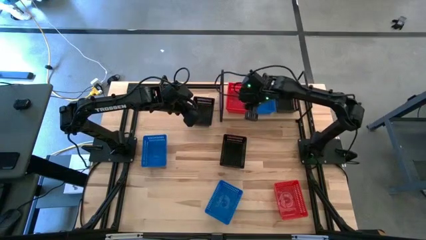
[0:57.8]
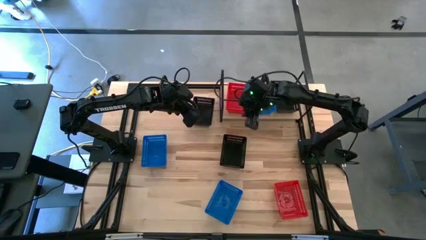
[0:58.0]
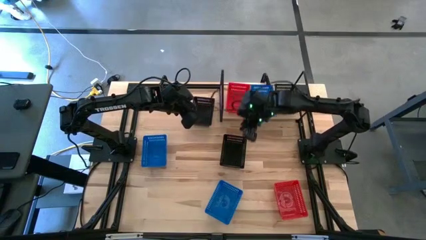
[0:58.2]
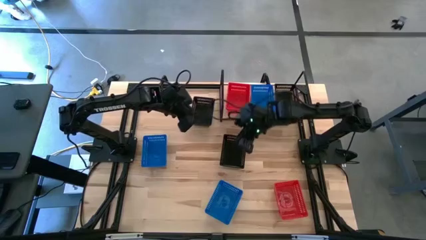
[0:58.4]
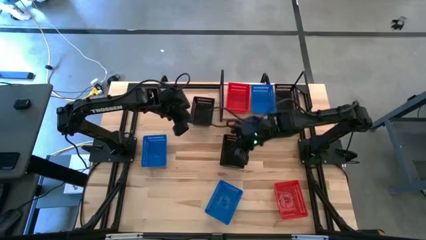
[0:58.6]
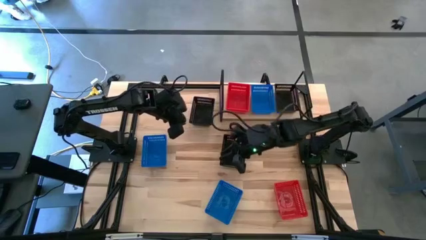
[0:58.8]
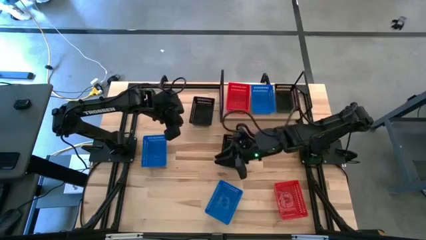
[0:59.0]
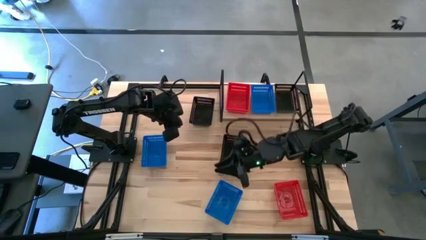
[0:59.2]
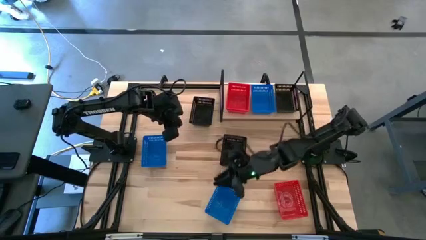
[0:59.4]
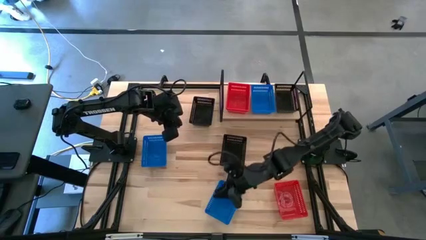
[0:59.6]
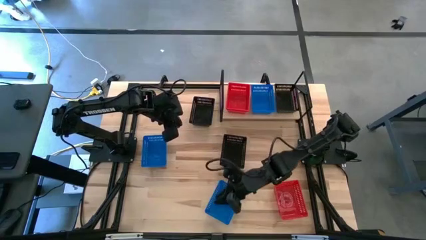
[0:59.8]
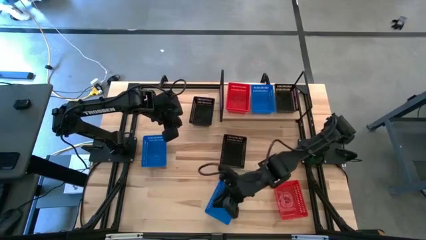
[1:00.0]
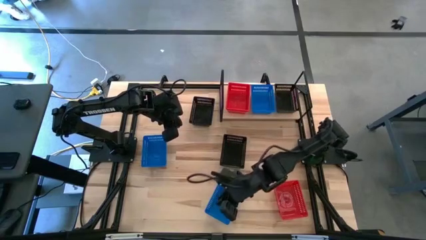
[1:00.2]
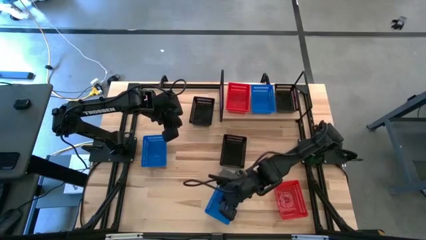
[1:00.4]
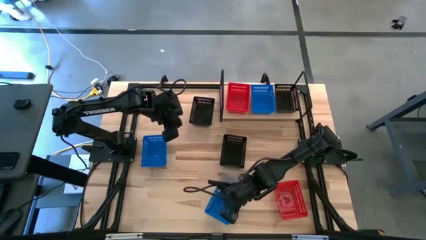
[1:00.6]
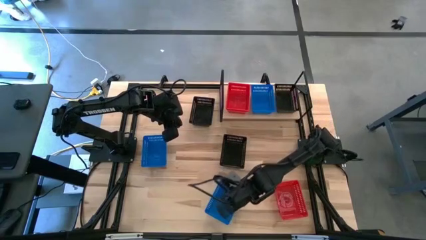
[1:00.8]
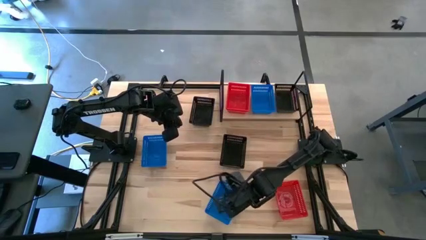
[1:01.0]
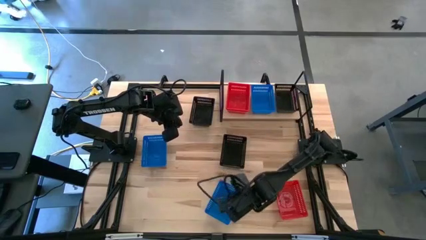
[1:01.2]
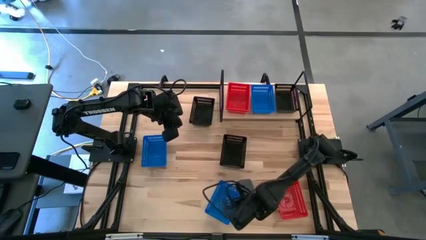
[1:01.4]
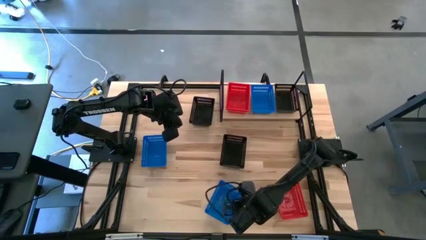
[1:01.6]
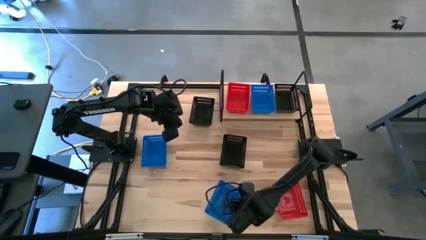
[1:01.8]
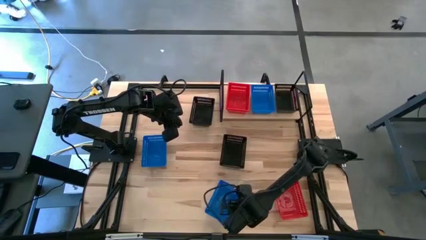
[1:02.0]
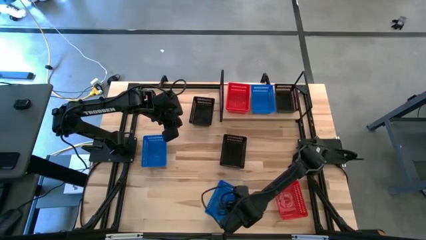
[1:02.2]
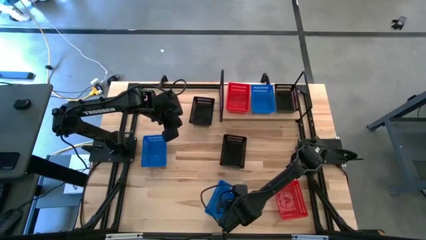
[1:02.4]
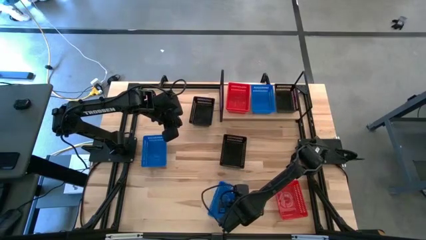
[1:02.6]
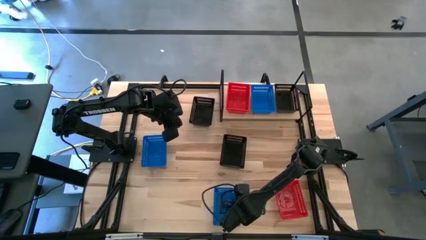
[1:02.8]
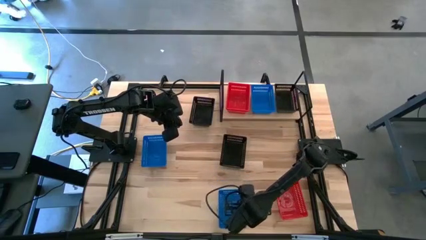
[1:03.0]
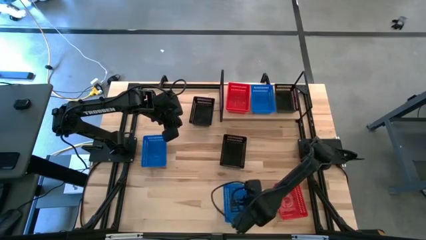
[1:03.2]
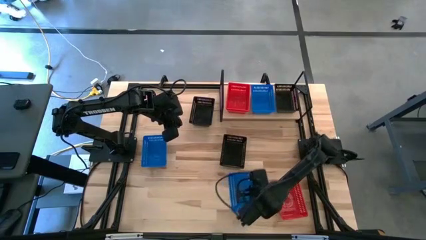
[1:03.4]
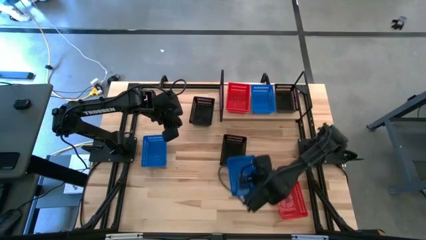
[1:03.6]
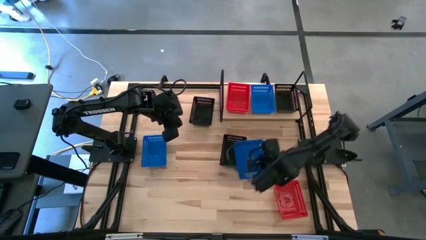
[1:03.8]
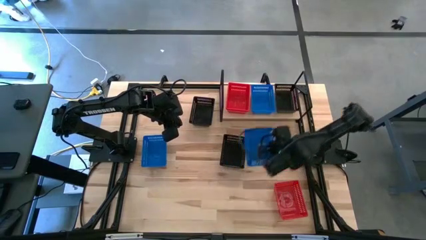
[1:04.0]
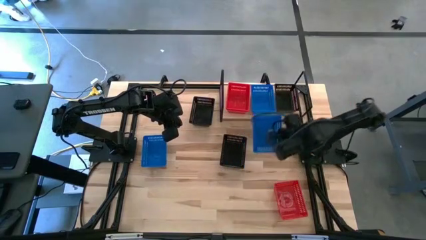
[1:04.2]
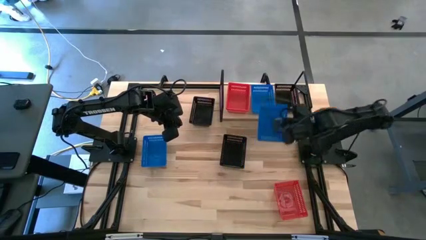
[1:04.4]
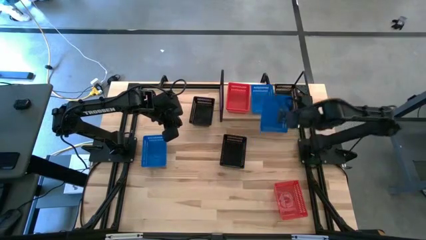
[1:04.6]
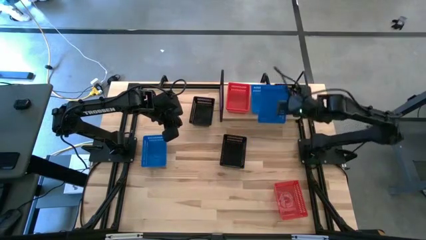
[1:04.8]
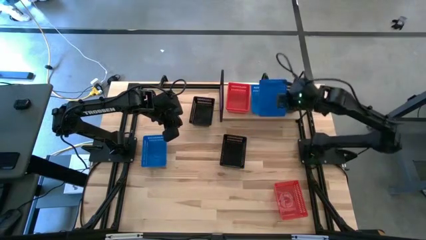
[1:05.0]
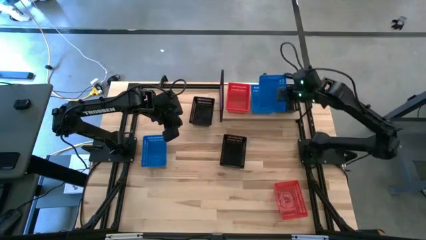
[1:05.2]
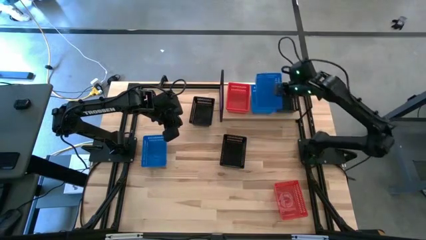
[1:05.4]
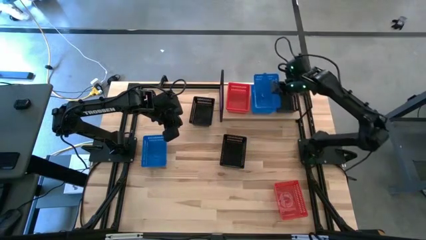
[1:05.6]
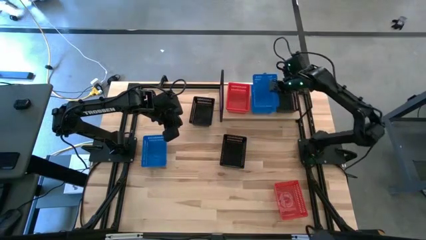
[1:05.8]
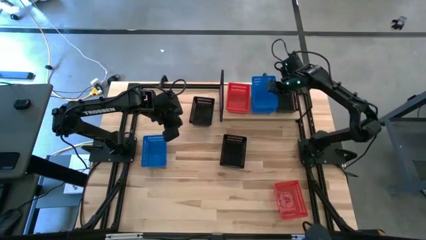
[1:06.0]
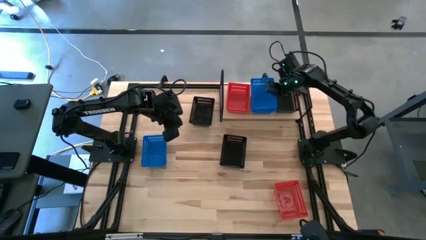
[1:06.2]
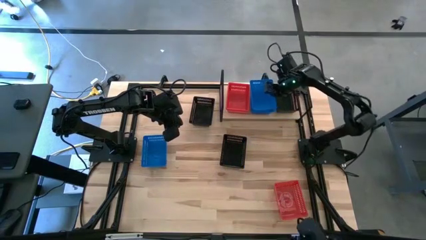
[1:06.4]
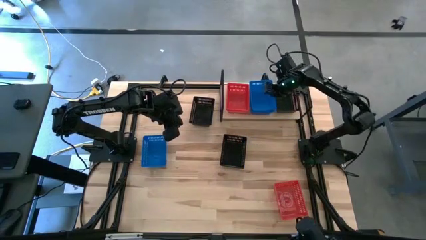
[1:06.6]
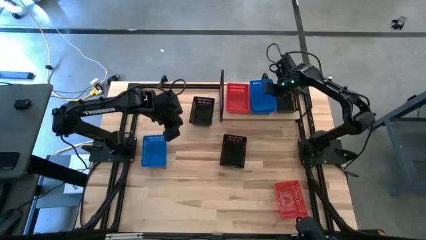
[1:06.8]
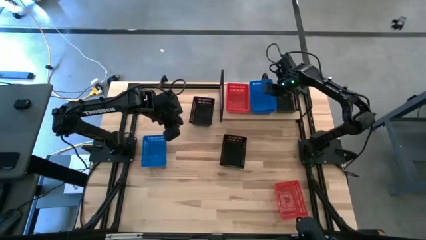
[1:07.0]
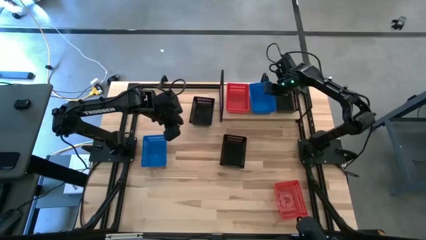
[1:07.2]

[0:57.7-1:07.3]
Task: Stack baskets on shelf by color
Stack the bottom blue bin on the other blue bin on the shelf

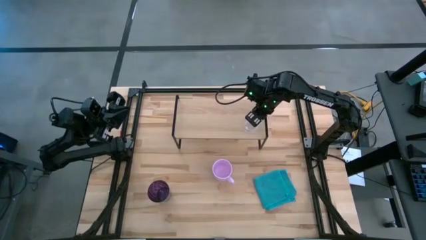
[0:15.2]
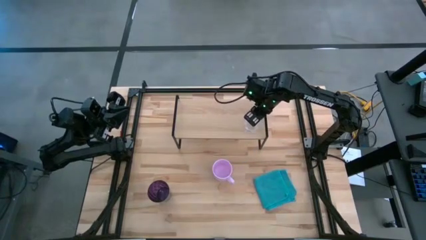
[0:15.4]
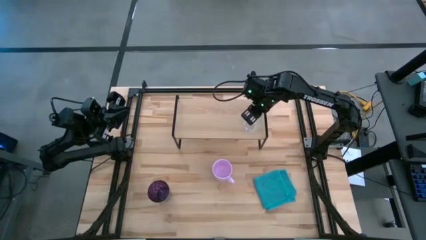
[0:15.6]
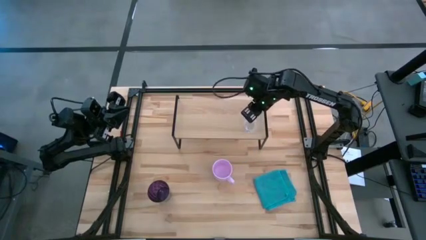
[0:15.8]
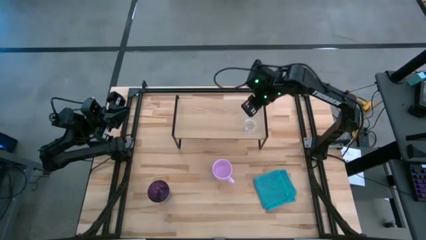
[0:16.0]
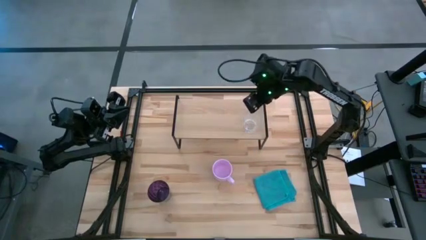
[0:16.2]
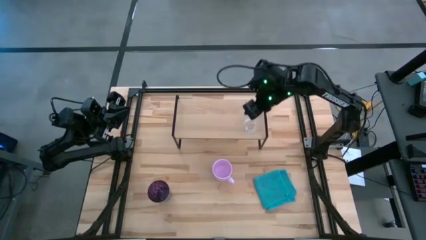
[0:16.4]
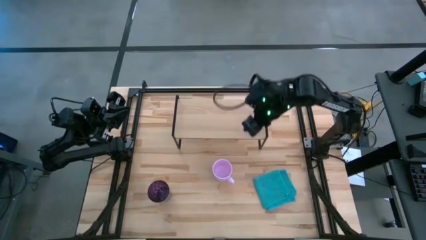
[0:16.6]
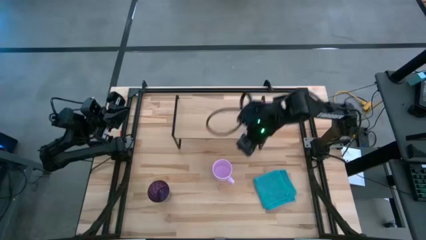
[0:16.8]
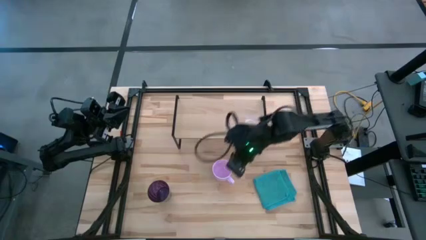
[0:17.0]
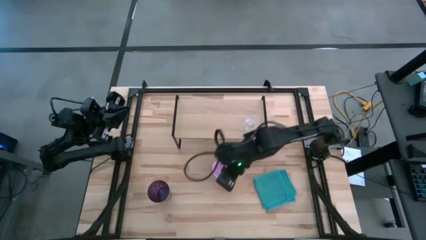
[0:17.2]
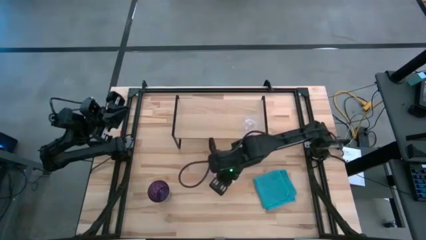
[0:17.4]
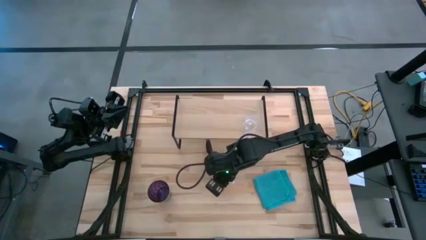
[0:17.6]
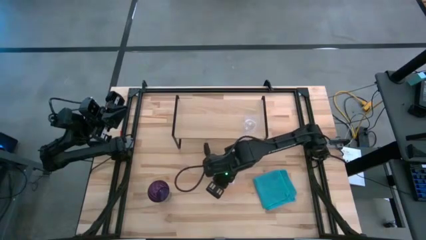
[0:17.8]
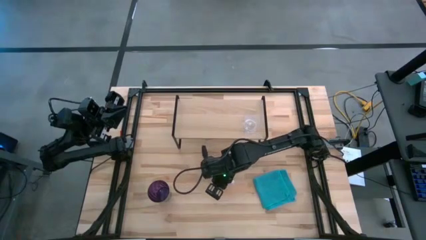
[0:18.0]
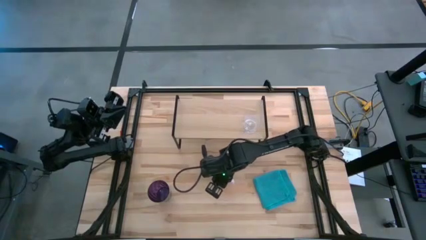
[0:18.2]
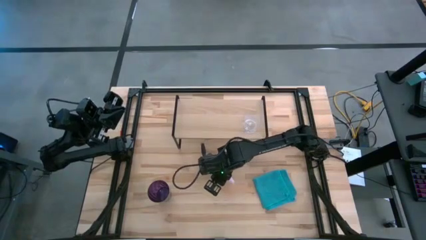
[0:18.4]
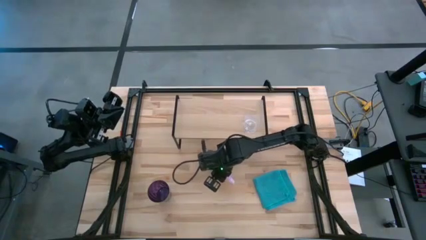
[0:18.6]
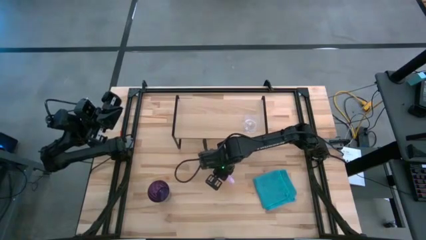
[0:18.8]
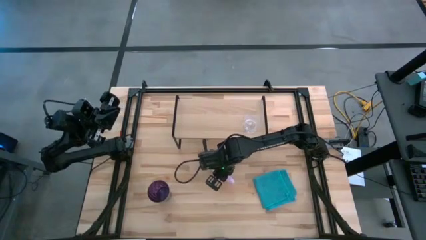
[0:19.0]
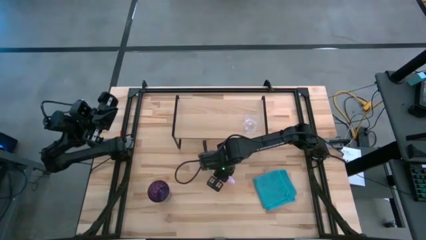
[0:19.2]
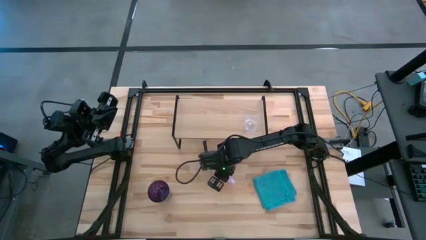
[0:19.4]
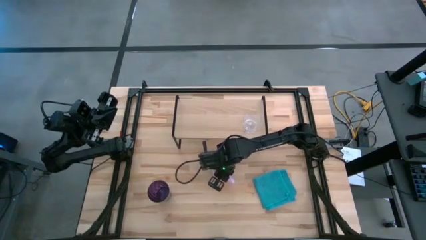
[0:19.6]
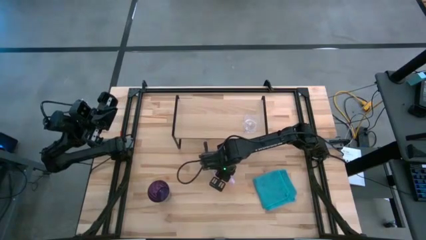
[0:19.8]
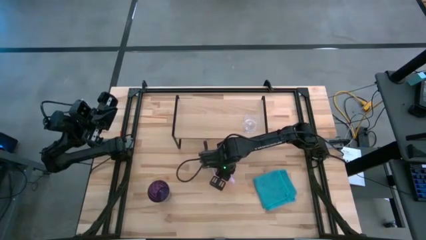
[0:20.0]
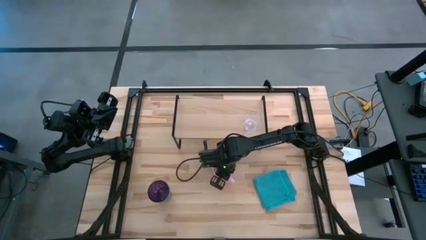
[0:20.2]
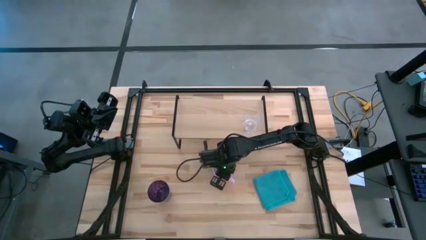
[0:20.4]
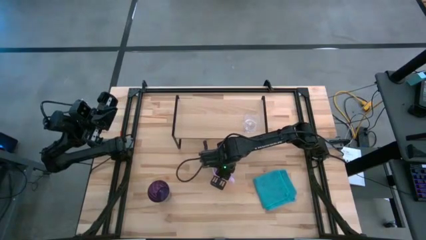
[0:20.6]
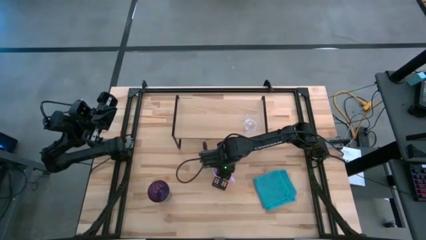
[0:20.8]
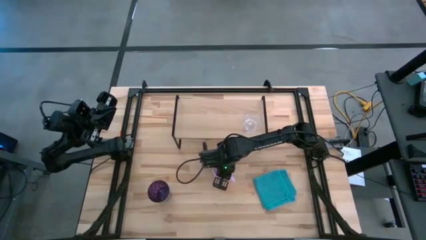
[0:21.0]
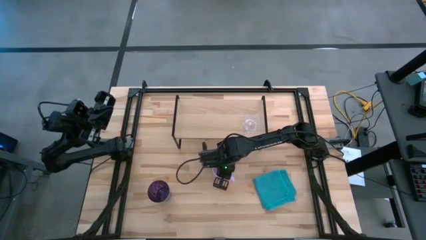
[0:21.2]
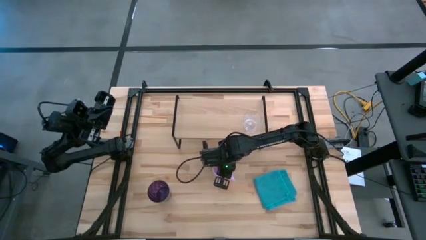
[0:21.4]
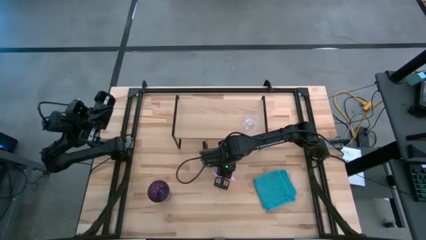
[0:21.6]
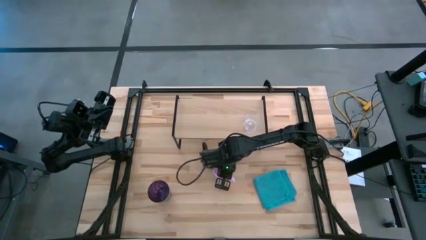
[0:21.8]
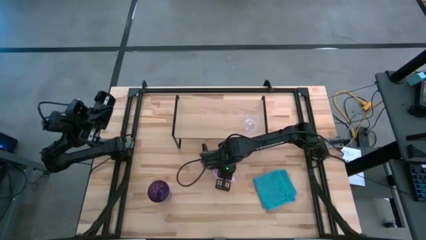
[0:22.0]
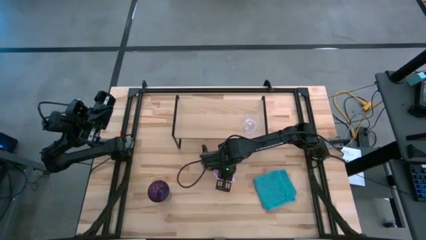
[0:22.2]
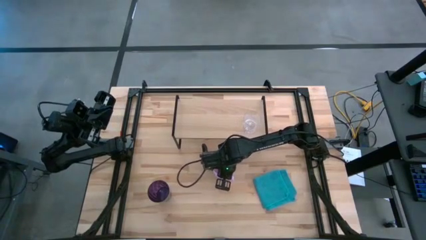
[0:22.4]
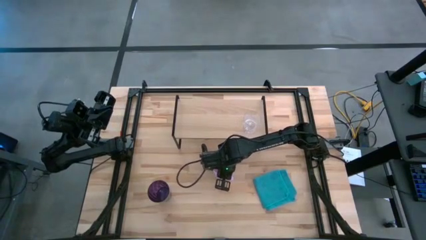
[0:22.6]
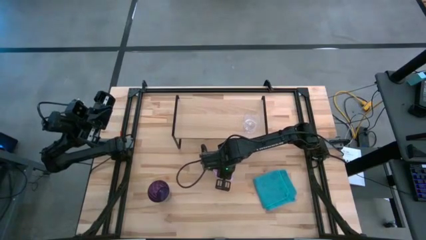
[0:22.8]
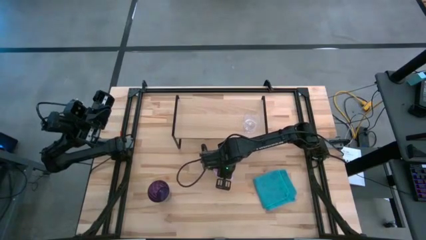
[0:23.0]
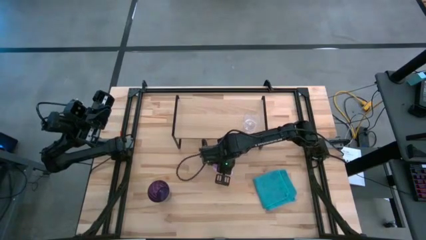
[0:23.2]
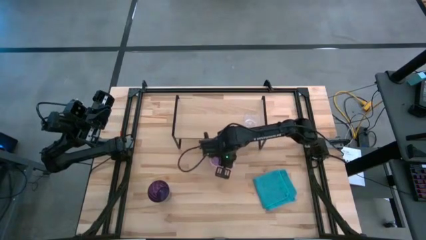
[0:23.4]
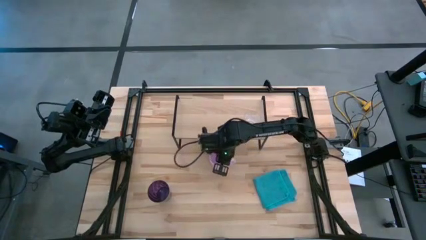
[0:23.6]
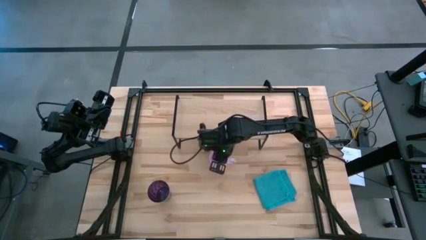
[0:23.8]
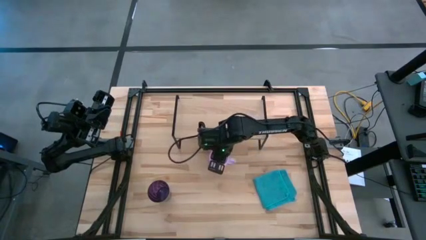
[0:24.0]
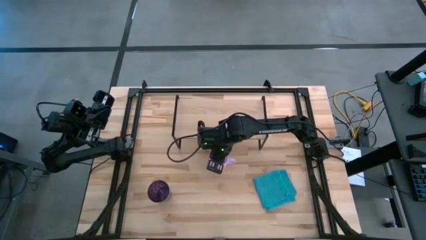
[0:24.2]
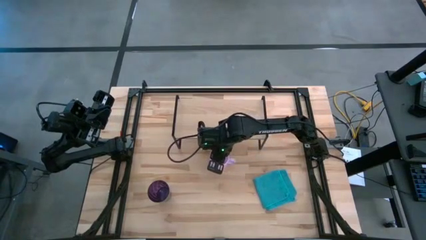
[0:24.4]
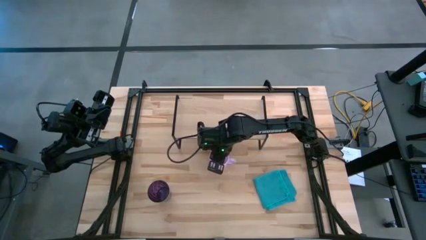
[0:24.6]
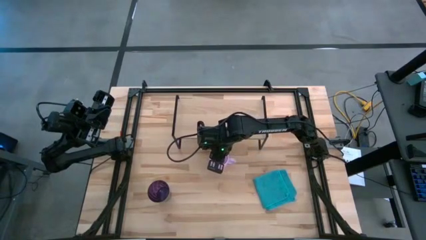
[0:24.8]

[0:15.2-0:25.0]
Task: Stack small to large cups/mugs on shelf
Put the pink mug on the shelf
